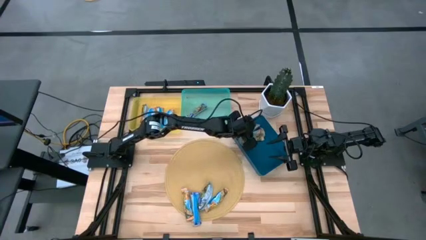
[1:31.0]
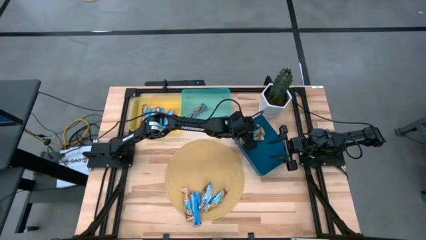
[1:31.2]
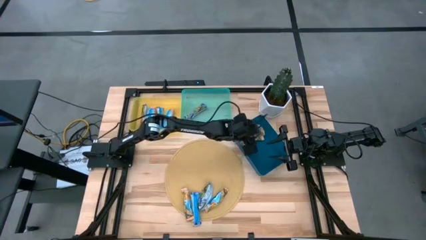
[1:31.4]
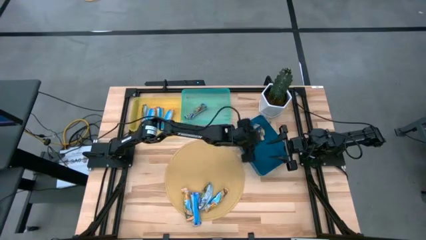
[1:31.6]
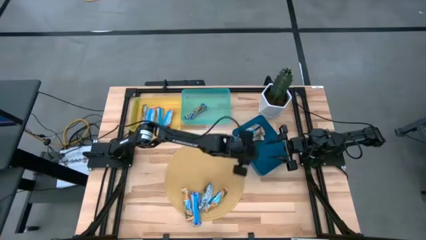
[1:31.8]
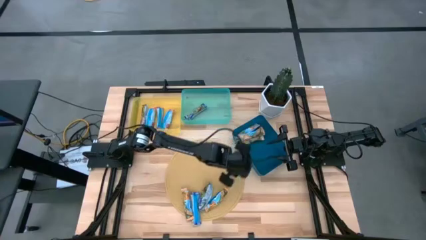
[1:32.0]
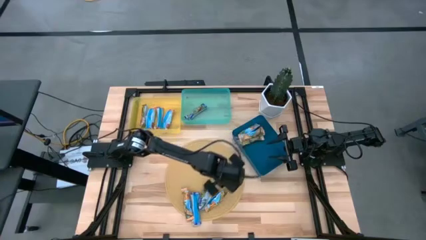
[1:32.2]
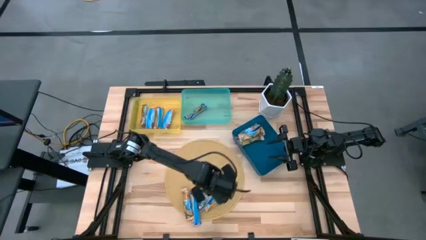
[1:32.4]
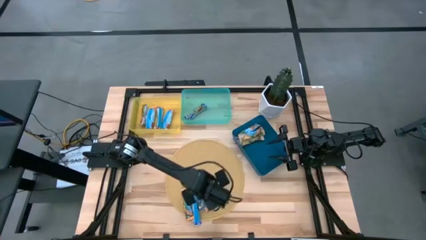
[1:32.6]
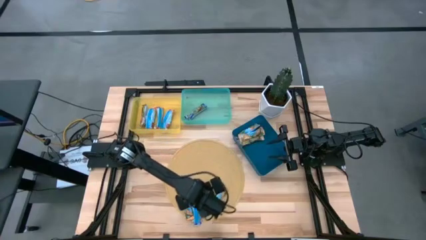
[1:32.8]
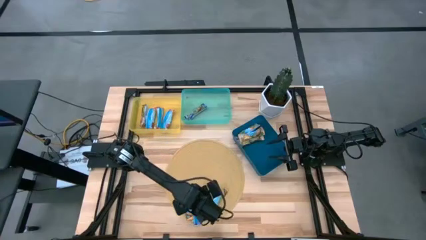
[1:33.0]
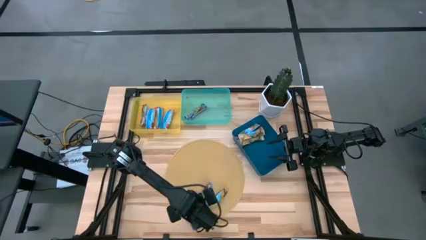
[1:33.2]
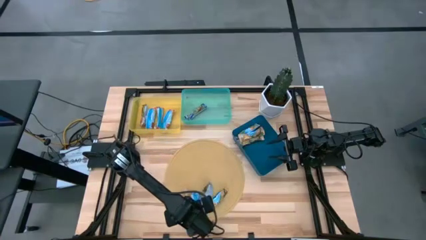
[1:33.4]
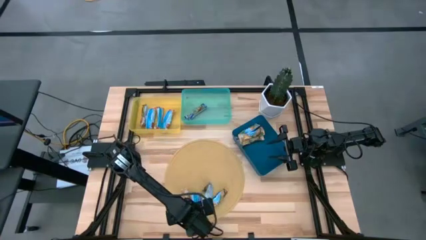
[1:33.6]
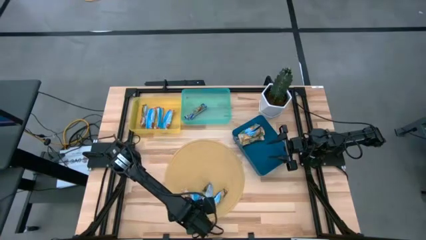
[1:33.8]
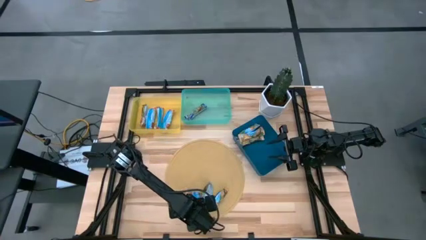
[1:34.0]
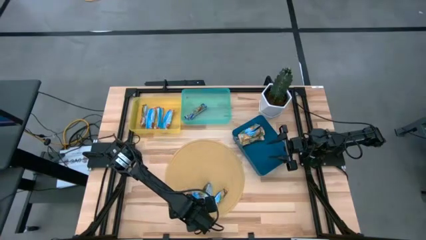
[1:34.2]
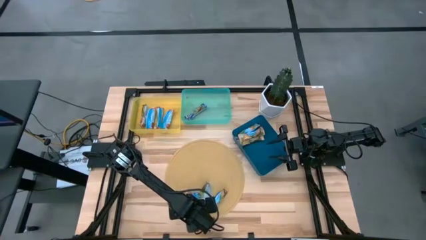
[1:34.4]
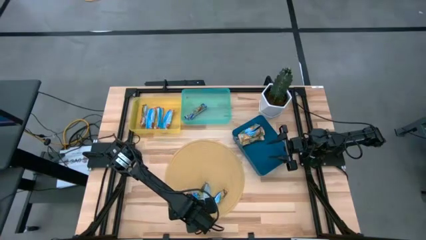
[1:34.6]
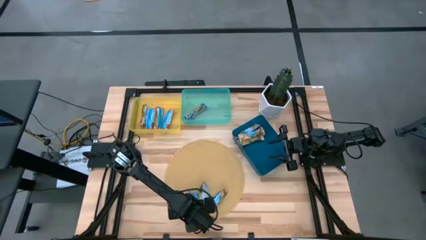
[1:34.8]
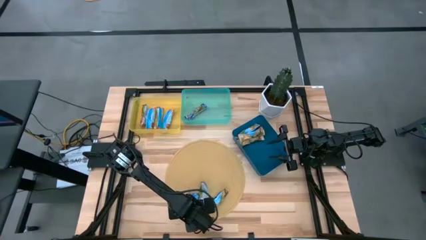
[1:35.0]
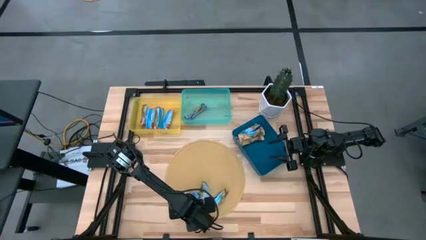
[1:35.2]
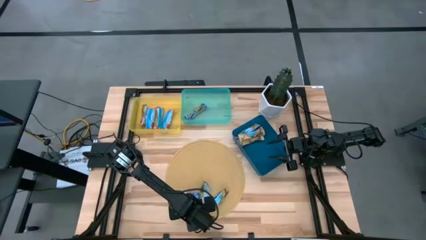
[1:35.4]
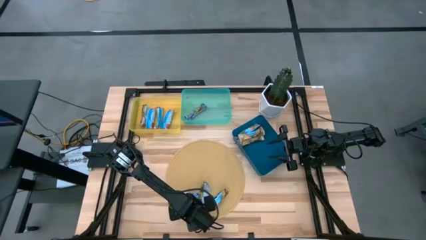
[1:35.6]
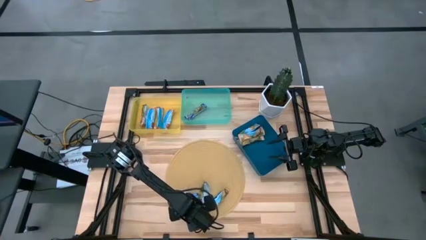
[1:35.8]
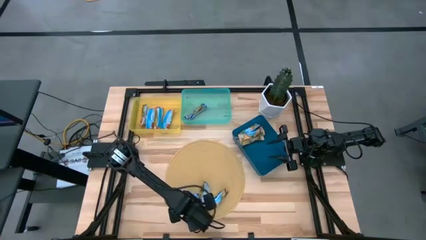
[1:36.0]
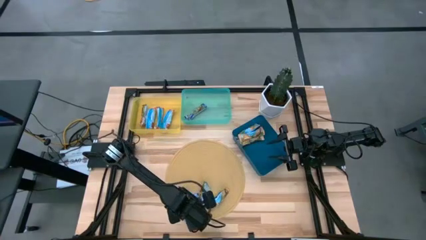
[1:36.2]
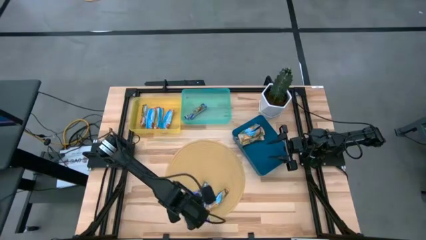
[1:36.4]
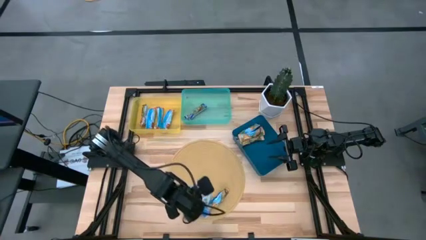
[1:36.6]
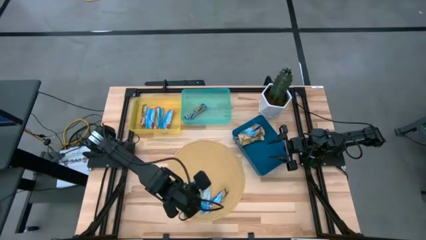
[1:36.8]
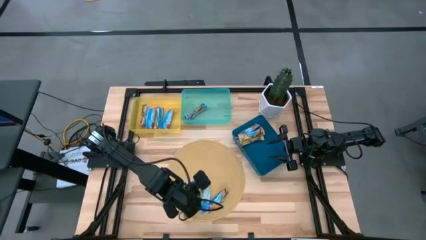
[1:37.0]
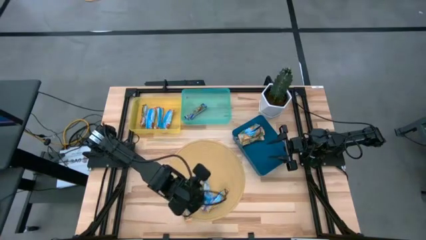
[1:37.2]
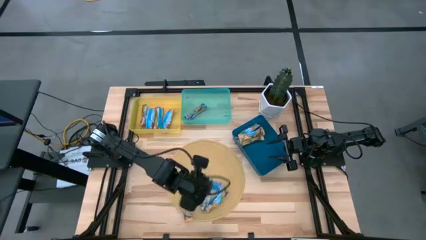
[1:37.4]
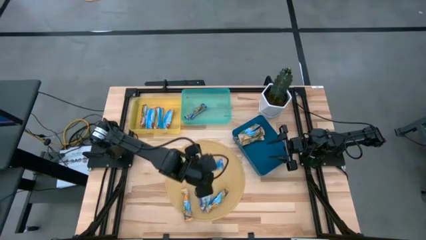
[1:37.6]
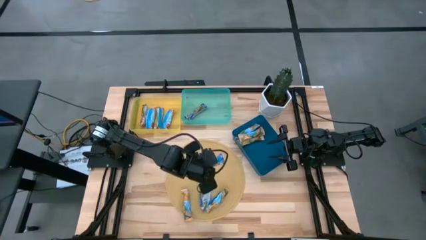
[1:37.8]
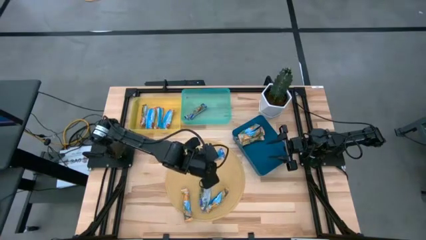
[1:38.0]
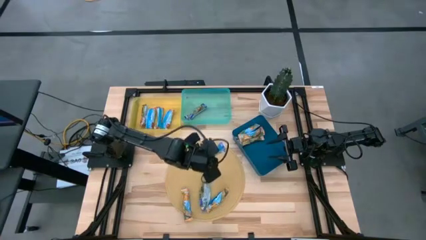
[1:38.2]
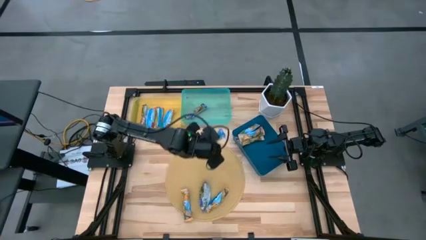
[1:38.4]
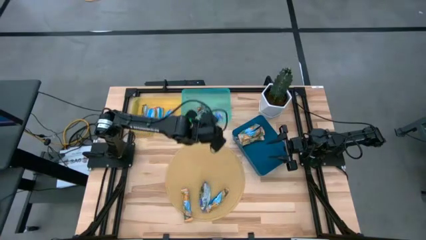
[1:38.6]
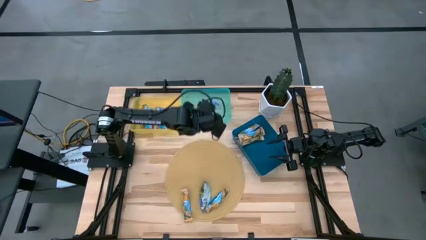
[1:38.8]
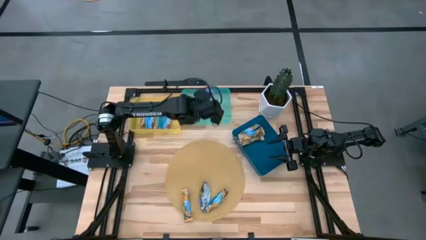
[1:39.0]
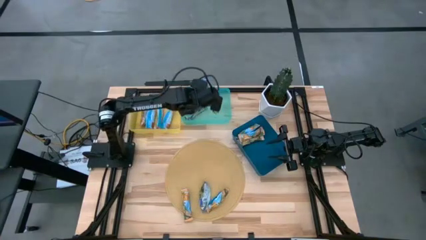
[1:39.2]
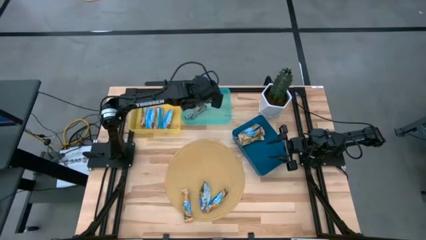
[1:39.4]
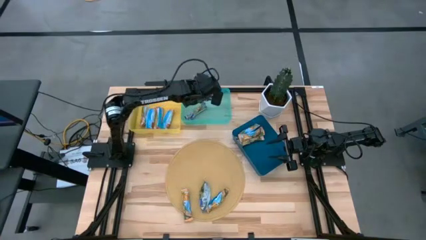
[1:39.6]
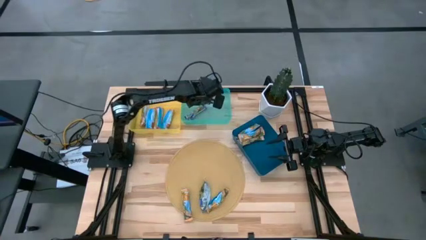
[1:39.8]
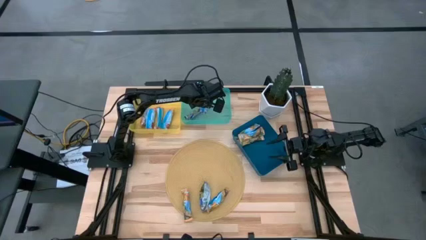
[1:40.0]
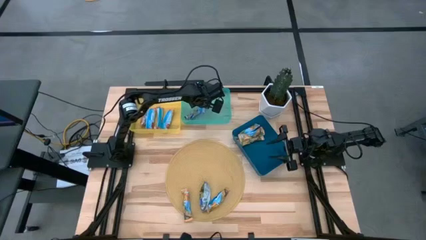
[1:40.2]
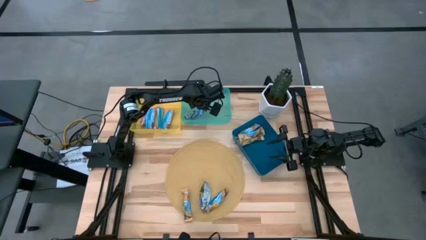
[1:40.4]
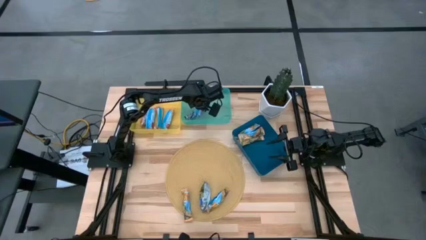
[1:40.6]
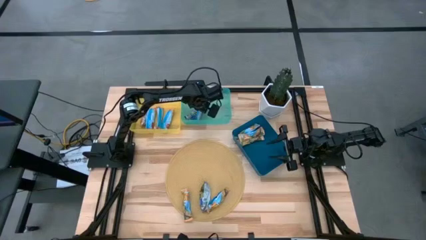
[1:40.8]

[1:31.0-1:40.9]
Task: Pick and place Granola Bars by type
Put the left blue granola bar into the light blue bin

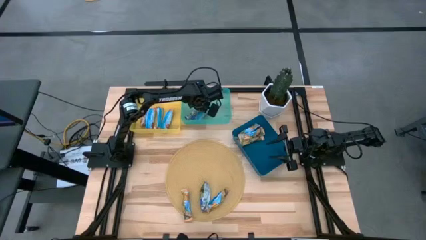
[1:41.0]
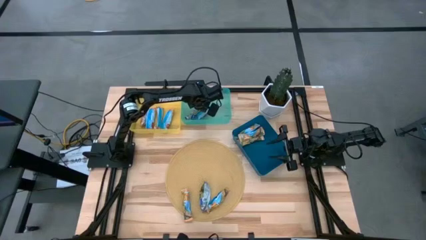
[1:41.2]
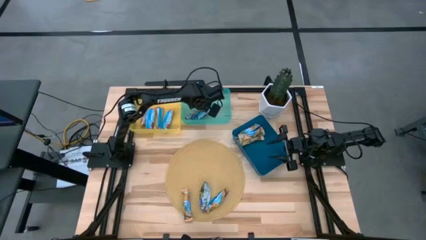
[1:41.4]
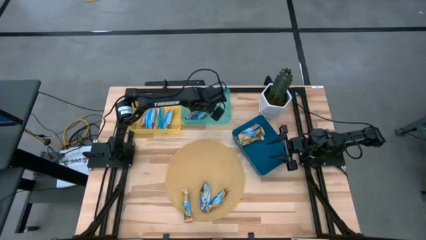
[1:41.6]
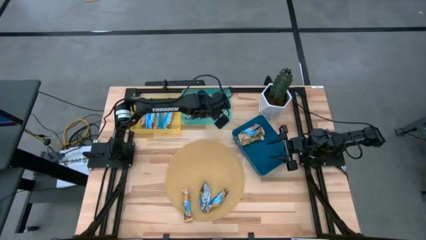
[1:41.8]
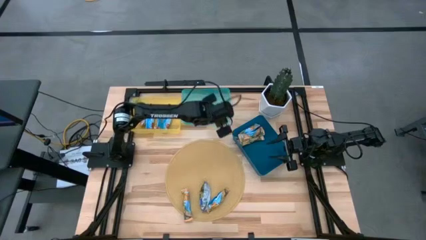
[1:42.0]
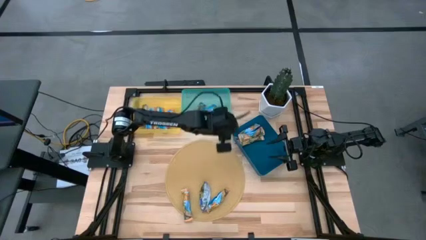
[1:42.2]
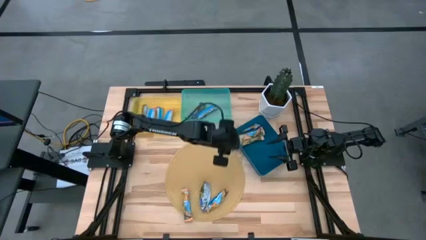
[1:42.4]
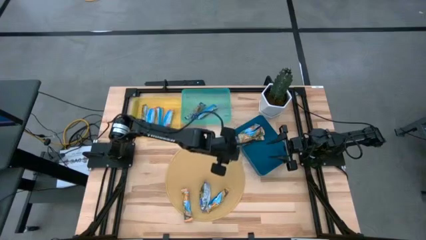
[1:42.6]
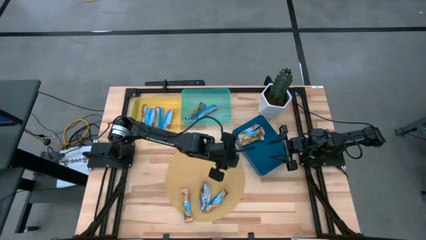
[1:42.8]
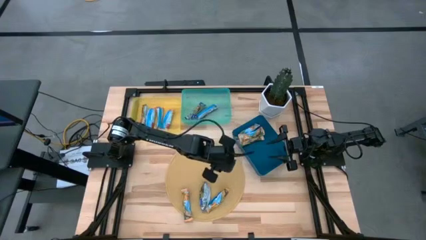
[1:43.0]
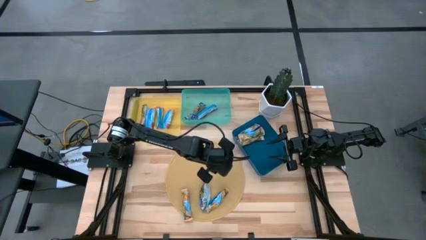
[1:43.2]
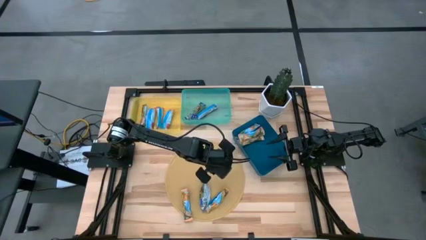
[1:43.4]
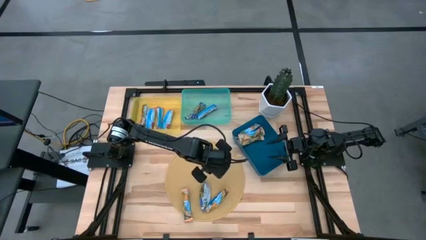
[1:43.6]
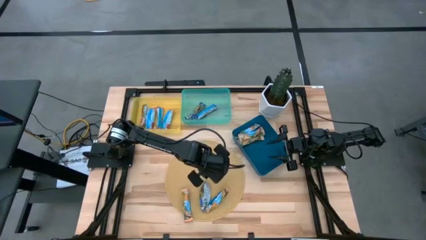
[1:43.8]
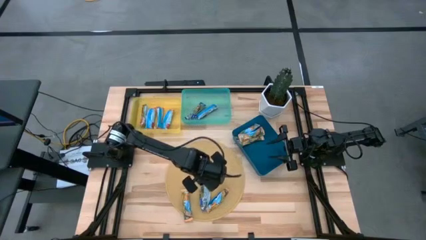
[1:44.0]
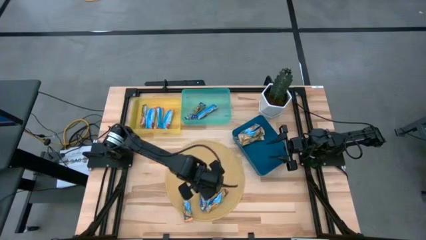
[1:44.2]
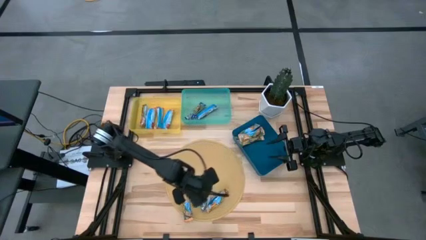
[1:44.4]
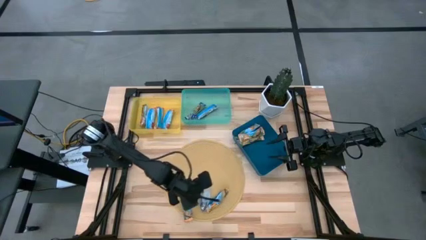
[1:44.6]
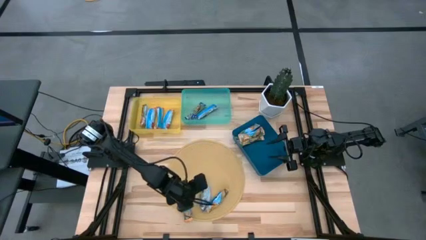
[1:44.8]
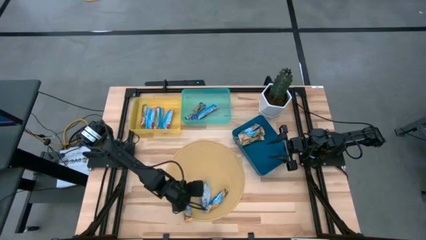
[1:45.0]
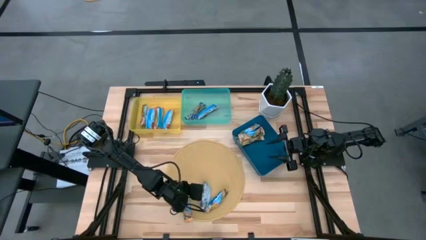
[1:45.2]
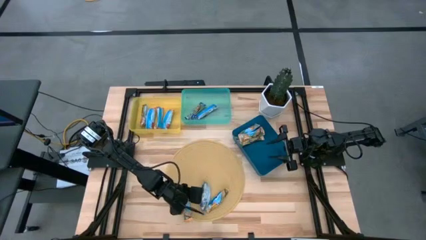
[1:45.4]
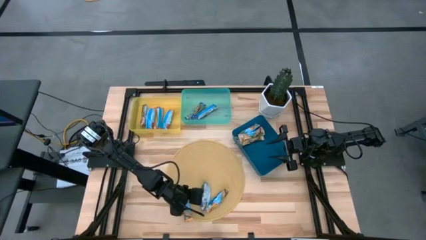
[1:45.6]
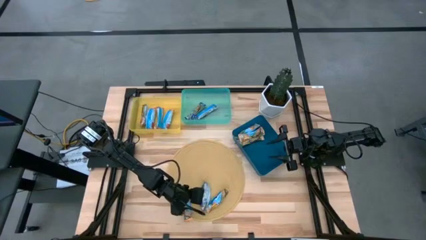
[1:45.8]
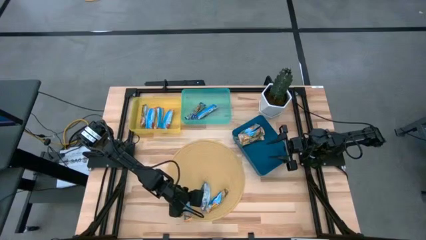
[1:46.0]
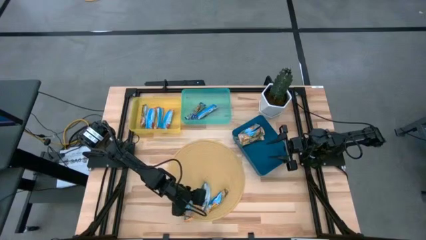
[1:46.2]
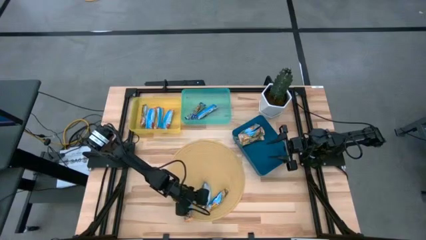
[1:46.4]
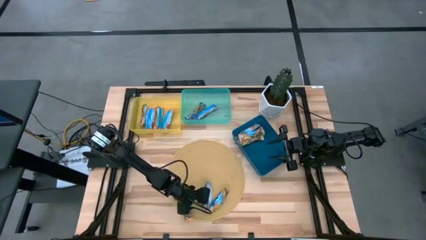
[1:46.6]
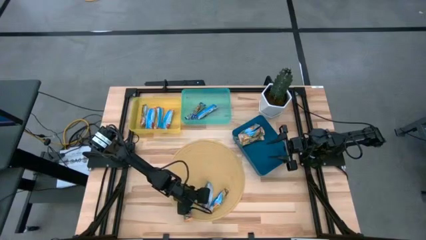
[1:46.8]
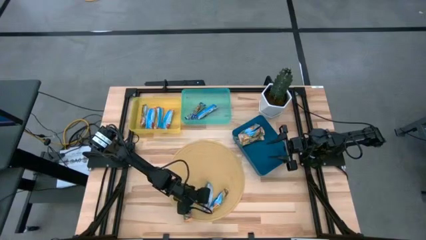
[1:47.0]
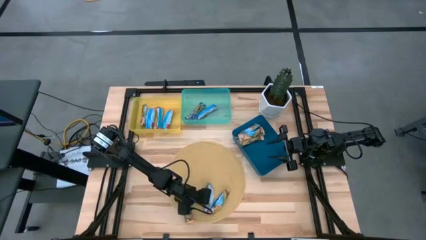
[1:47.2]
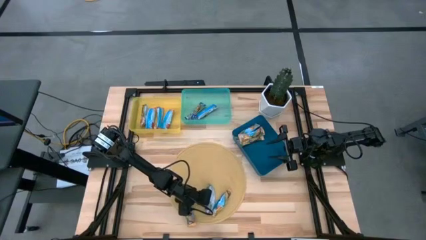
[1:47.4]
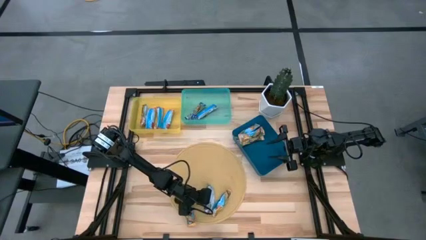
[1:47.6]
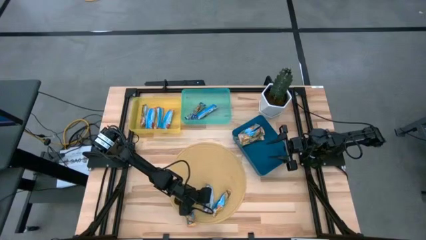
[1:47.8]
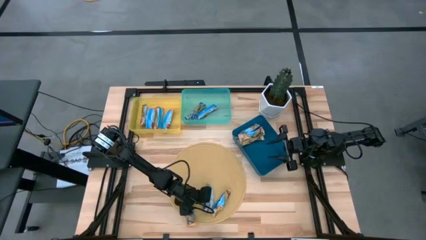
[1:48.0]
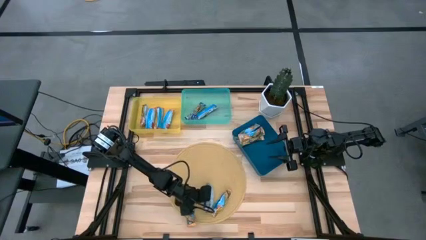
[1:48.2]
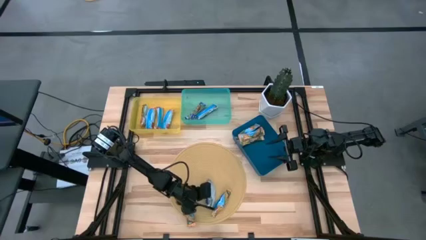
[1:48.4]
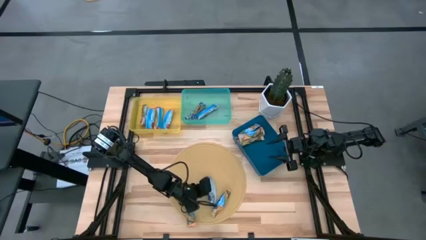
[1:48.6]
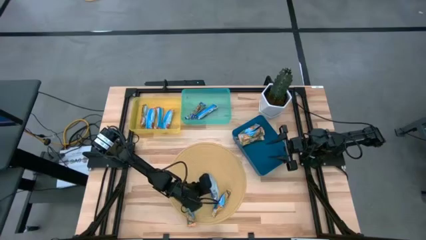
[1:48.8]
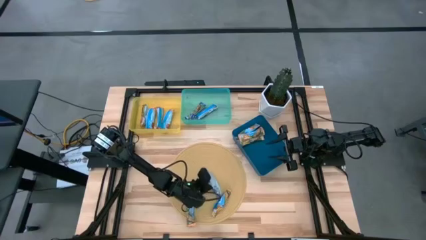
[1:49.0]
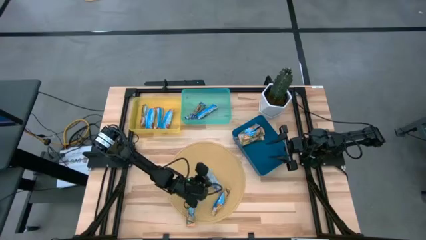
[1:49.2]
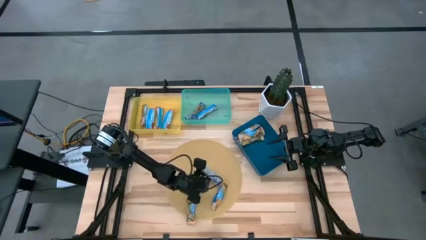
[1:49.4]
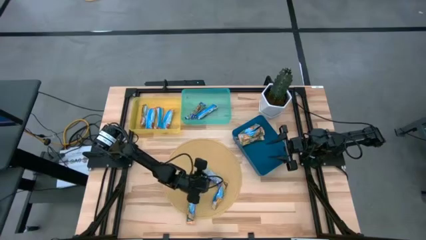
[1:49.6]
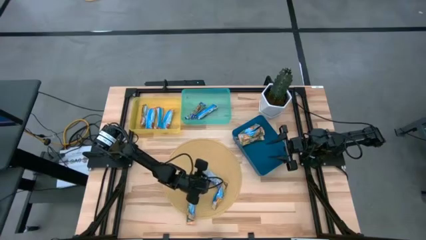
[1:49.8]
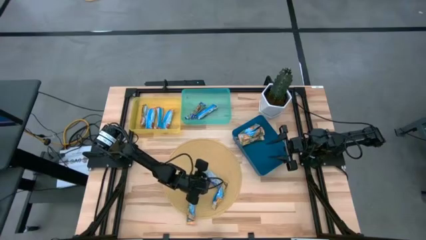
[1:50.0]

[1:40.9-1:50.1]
Put the blue granola bar into the light blue bin
